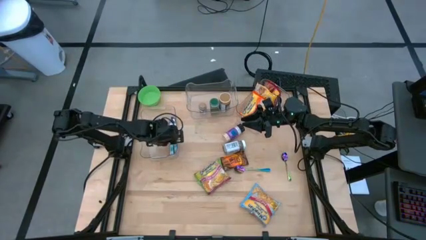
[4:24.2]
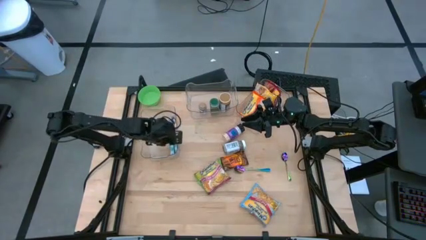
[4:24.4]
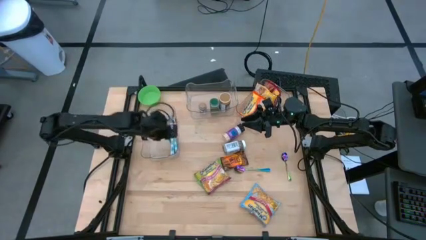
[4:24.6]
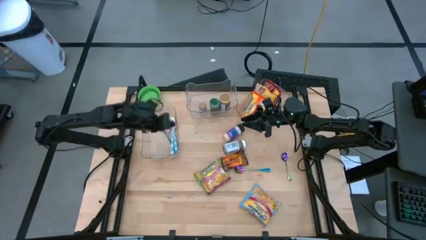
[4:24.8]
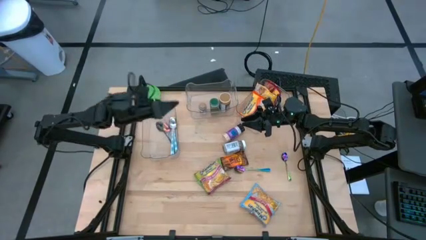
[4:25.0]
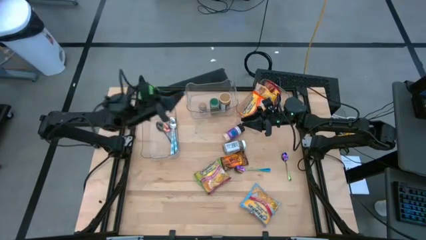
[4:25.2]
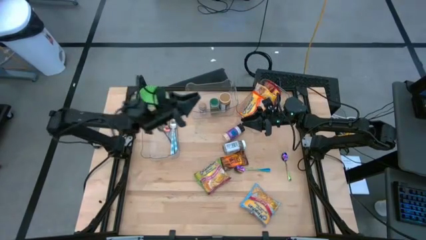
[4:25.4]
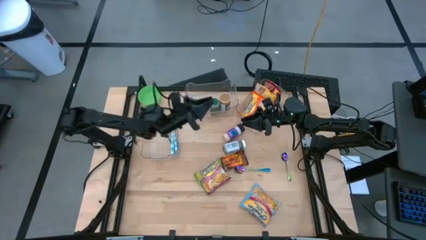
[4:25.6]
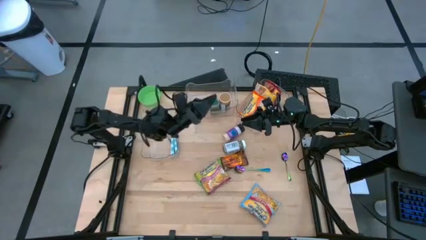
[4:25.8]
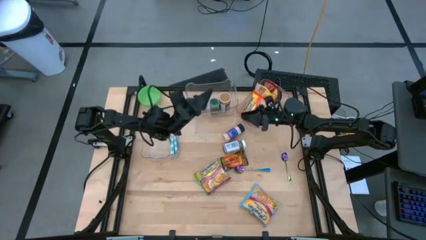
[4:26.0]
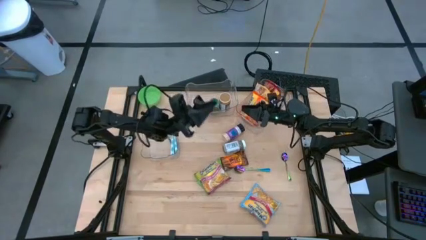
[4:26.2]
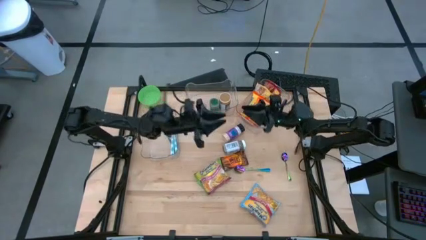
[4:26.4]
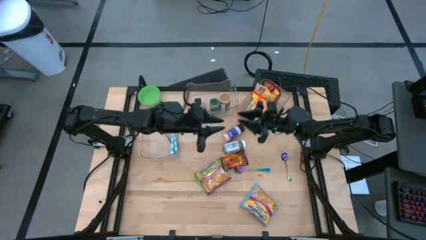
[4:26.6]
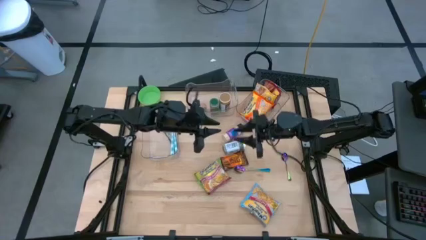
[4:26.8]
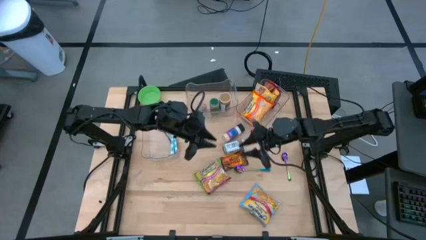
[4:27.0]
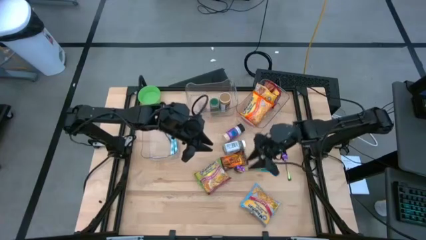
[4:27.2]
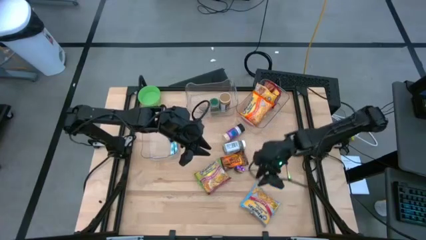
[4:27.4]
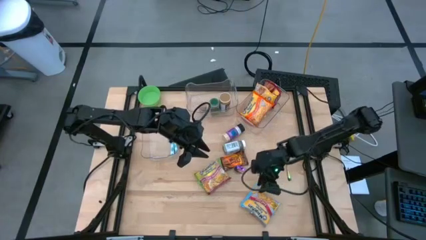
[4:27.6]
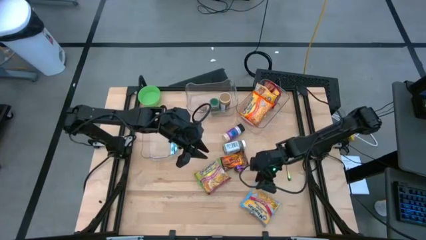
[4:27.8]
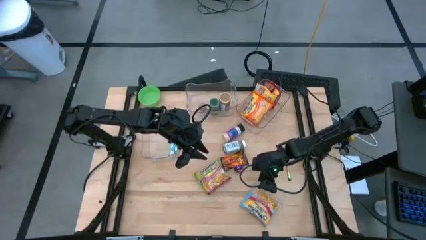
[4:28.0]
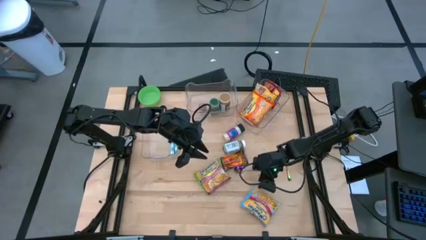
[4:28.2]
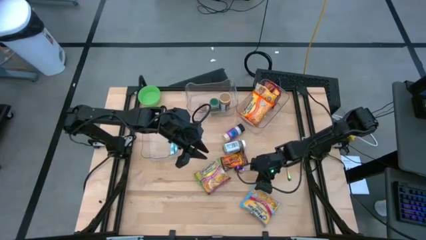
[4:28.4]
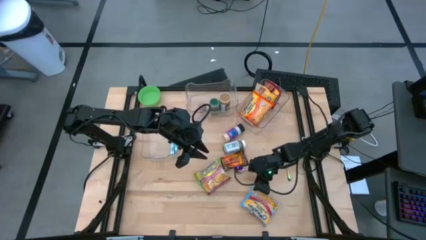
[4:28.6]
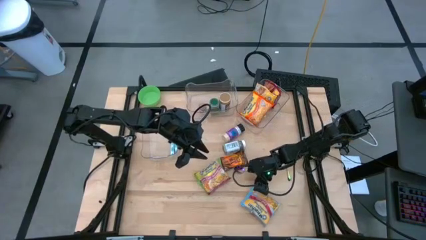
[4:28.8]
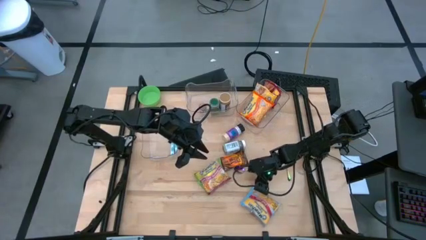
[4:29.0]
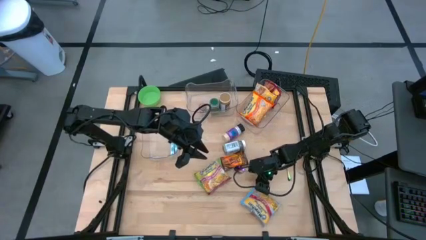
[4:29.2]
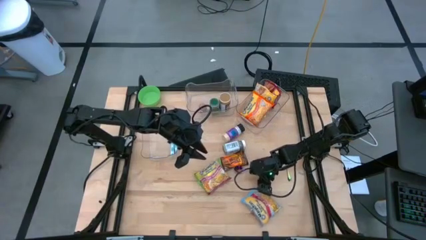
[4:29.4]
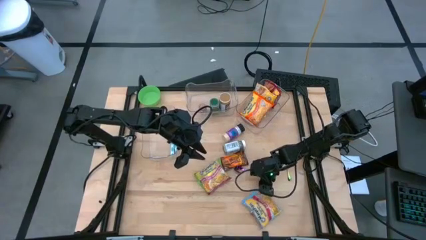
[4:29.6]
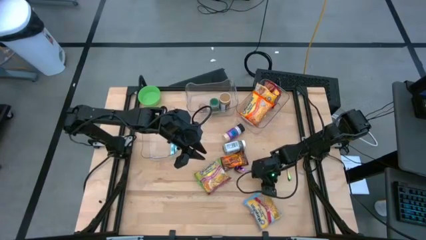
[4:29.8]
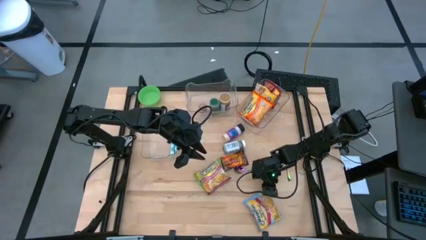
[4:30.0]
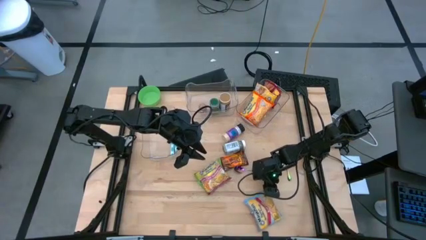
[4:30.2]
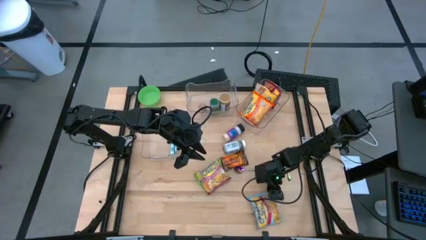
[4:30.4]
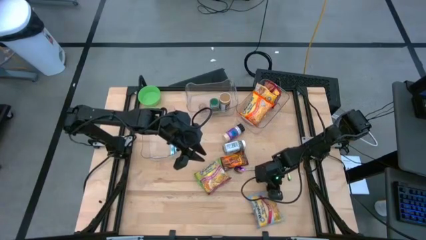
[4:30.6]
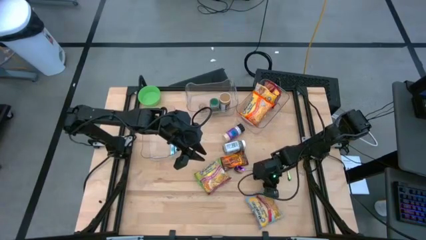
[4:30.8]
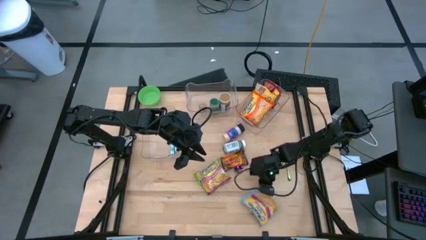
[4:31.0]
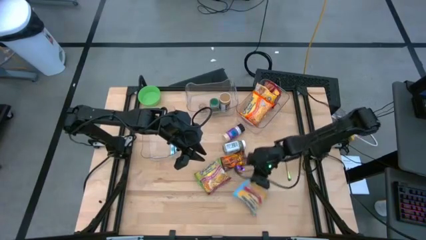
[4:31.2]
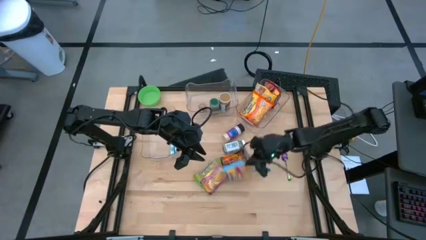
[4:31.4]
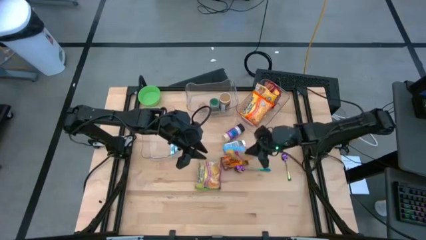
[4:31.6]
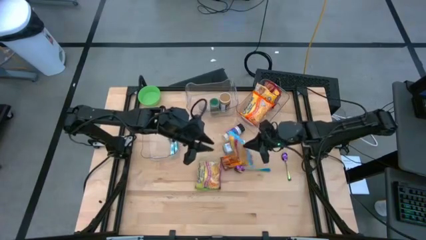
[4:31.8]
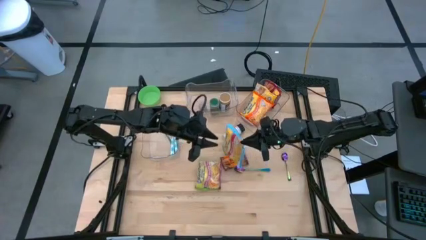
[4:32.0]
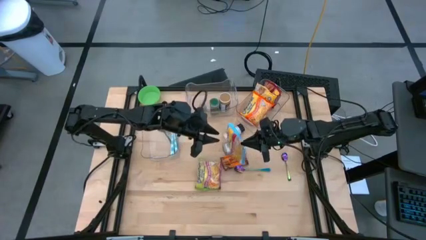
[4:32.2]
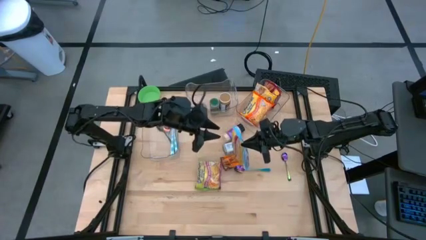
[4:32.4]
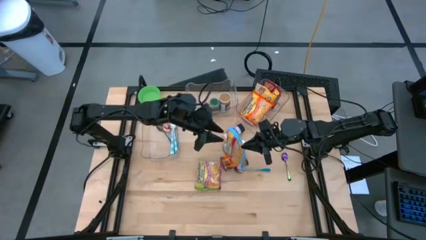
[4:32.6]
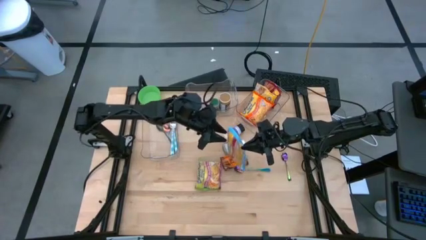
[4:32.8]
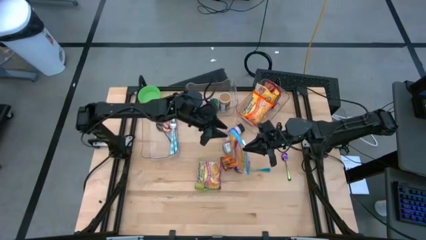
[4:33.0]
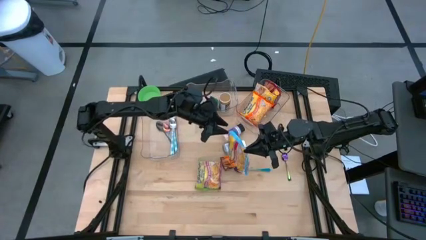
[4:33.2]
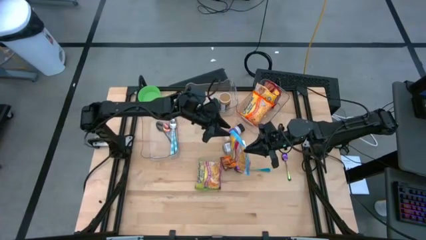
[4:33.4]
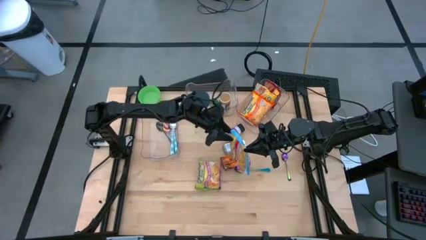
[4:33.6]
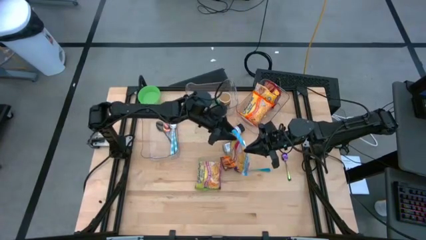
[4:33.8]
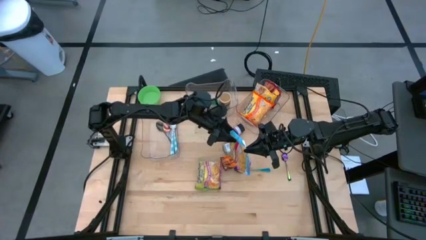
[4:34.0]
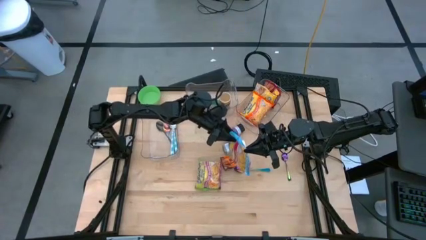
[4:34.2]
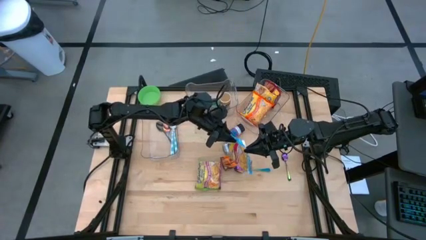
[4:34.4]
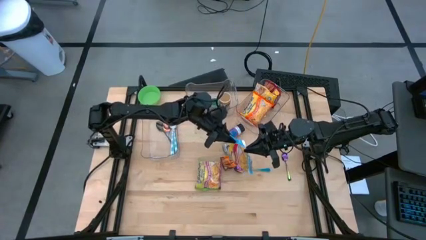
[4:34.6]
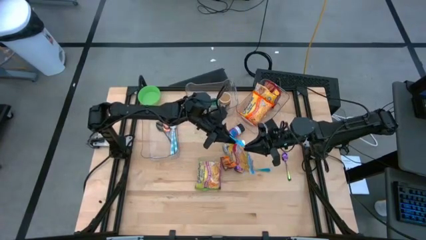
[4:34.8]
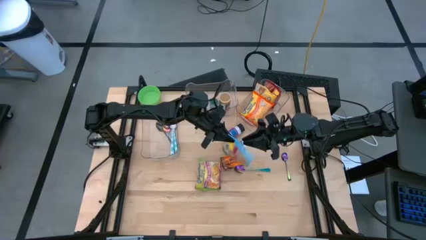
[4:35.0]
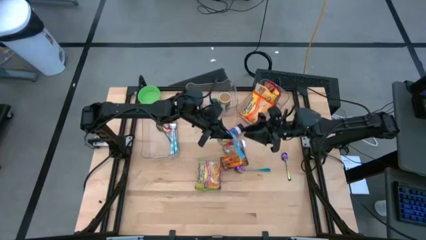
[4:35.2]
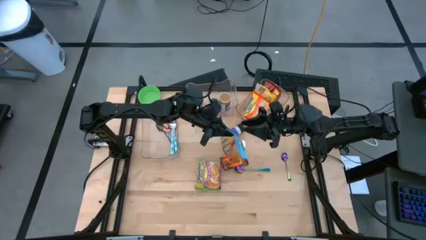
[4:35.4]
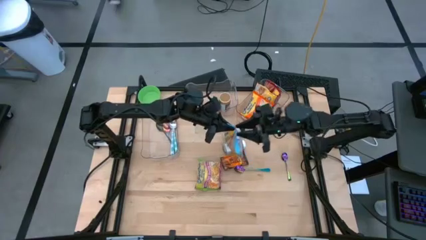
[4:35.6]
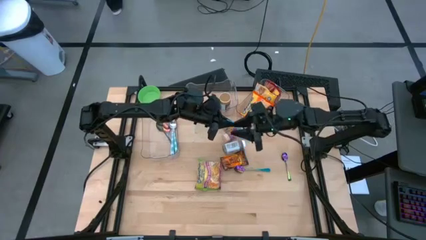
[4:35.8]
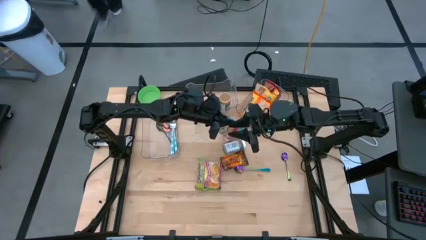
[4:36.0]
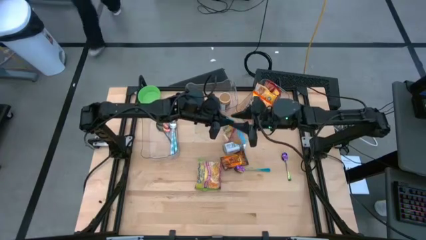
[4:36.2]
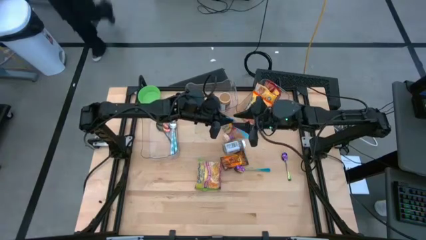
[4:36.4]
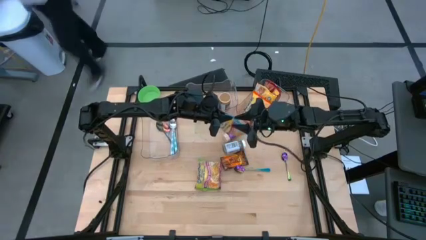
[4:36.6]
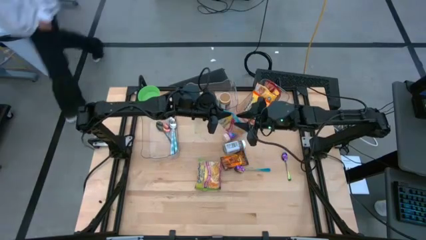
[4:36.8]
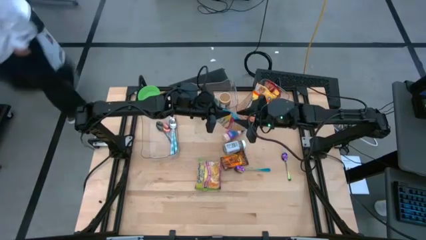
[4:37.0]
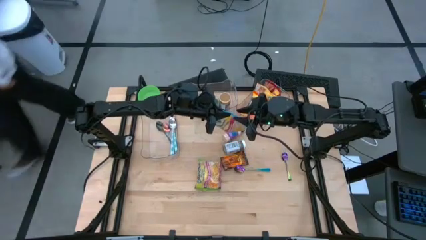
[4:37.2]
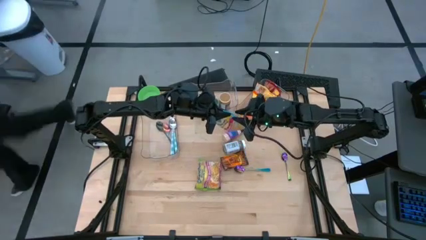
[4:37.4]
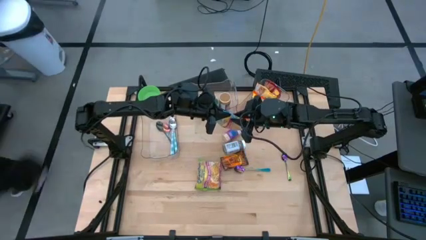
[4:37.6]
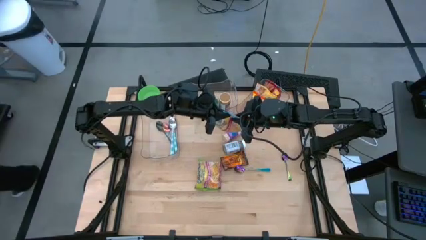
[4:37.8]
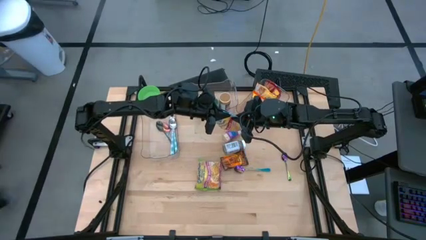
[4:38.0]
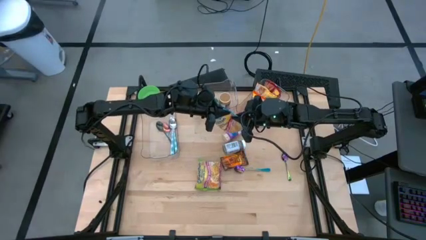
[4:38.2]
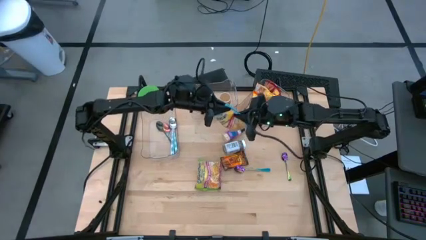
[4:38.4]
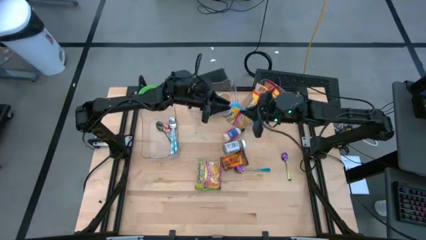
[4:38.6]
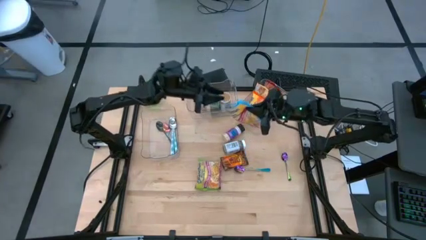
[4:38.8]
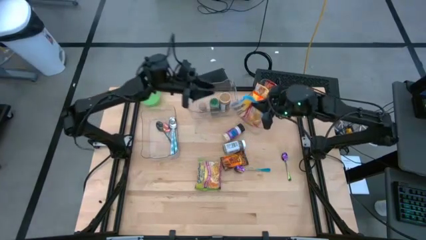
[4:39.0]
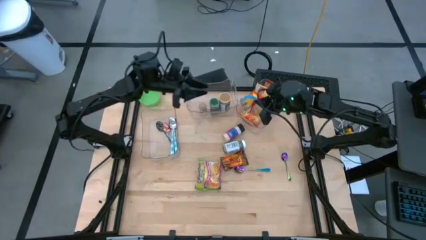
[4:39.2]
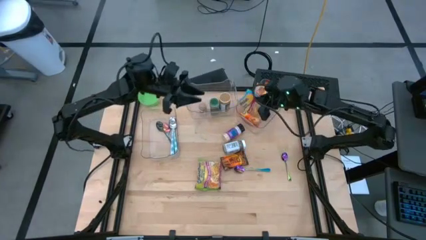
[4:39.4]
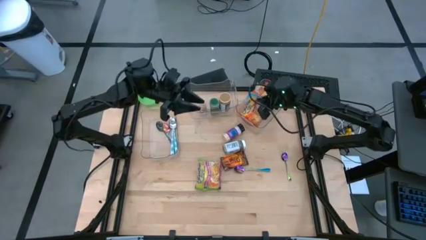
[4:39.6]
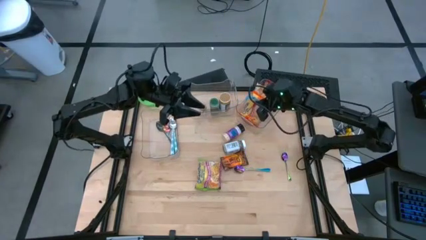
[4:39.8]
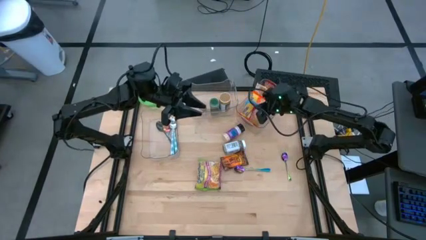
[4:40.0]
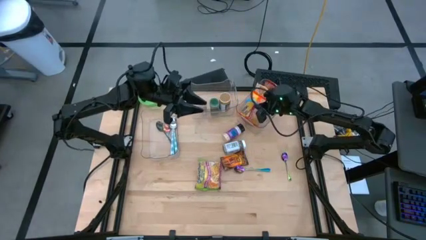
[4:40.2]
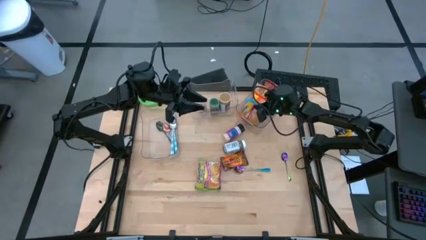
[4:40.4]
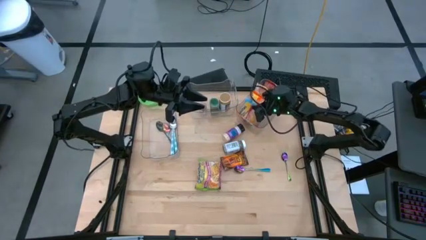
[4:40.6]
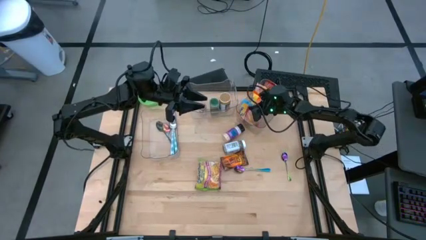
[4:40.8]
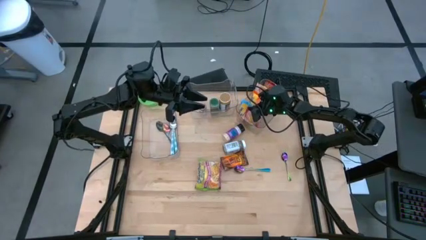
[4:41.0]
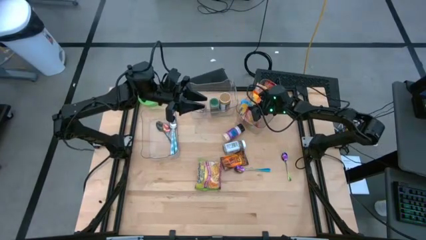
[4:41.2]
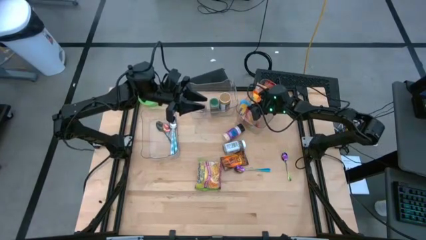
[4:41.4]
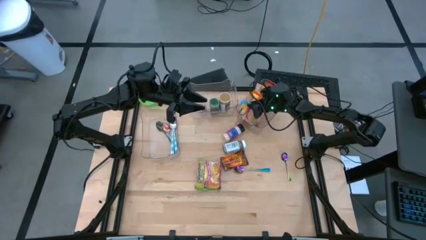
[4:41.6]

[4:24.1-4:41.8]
Task: Pick & Place Food Item
Put the blue noodle pack into the right transparent bin
